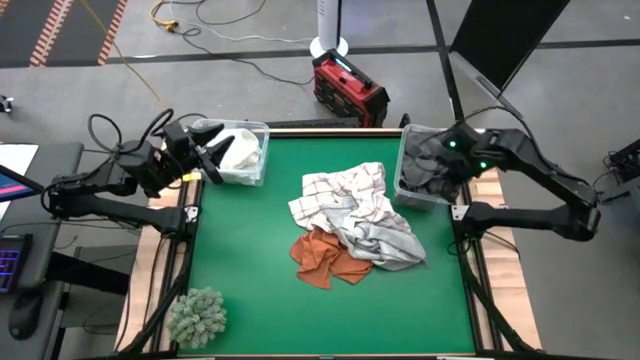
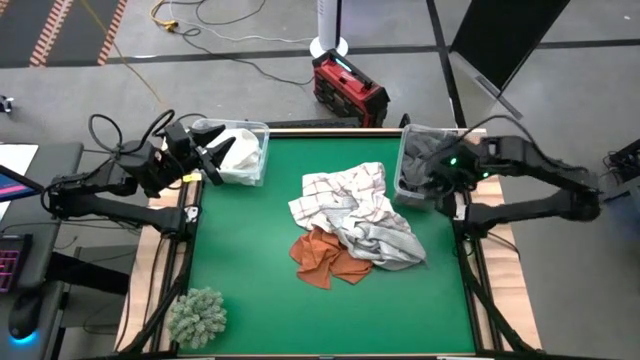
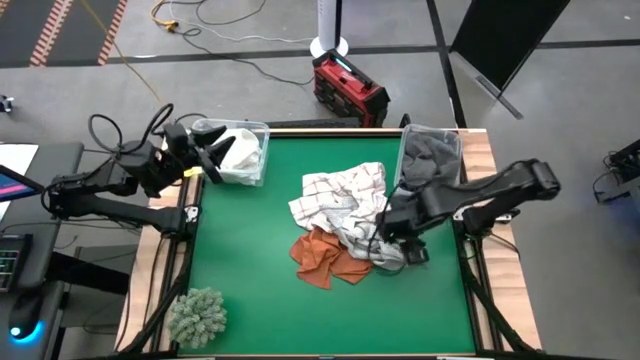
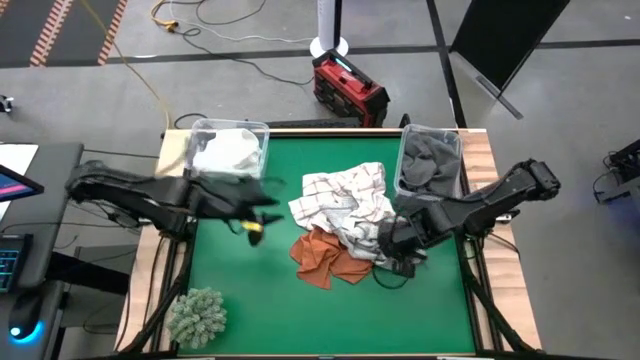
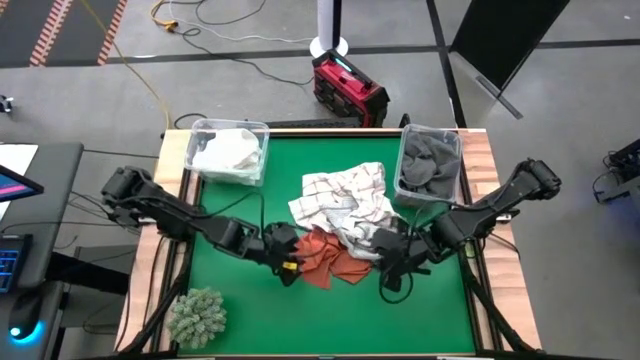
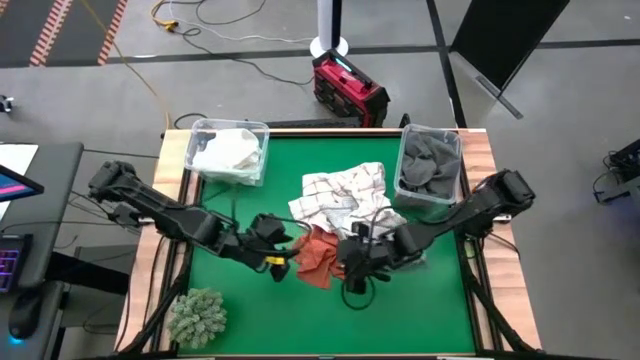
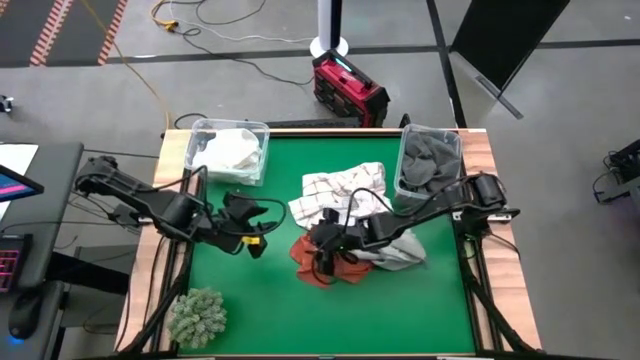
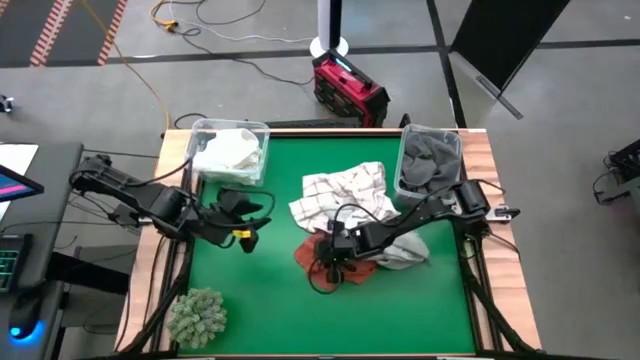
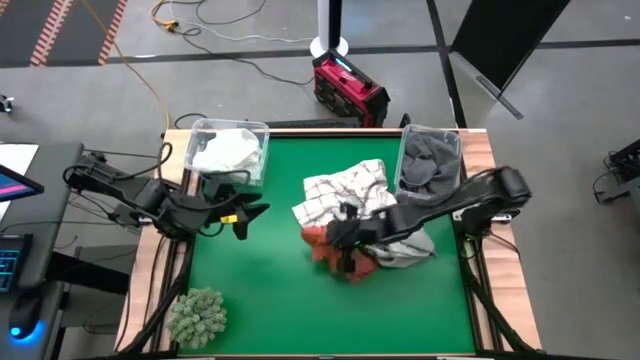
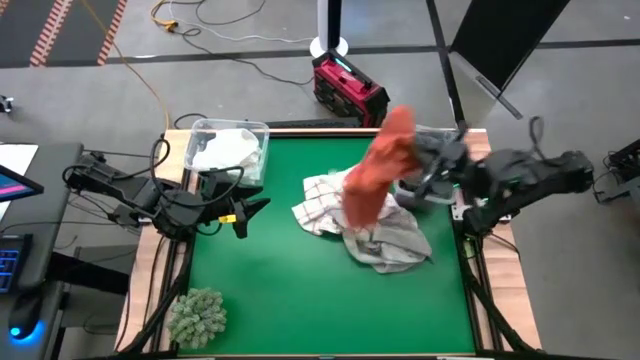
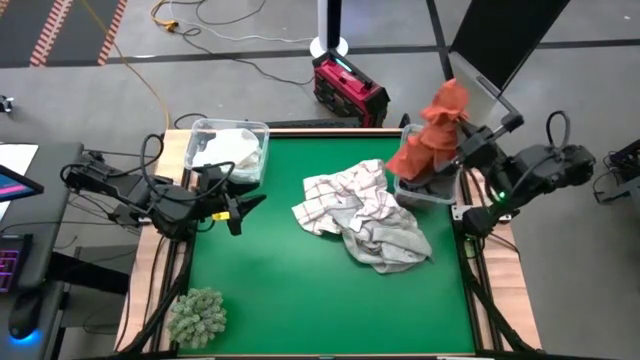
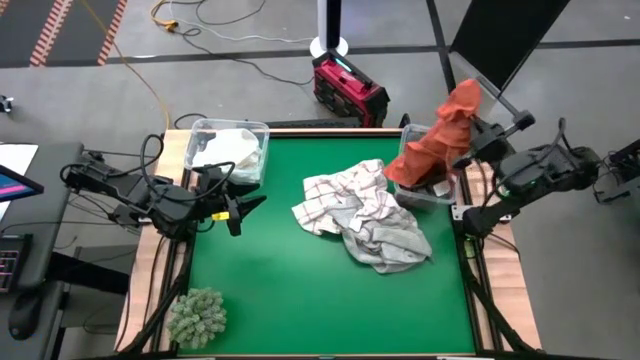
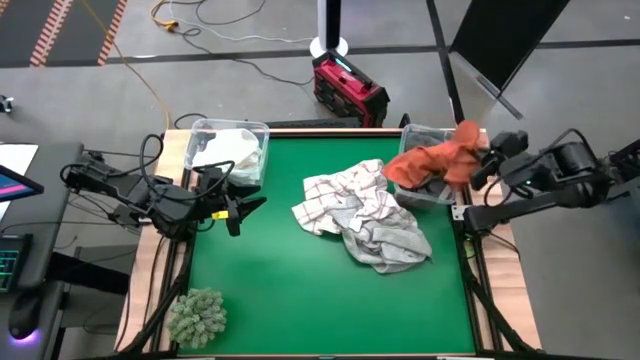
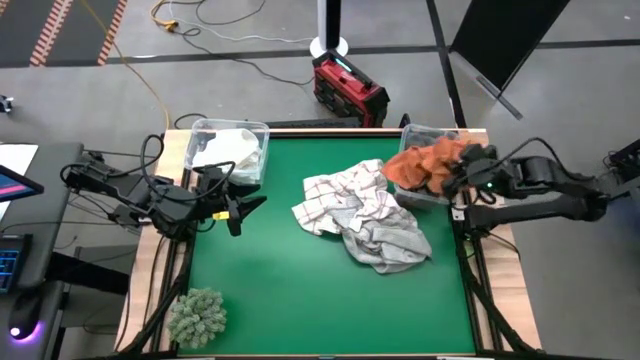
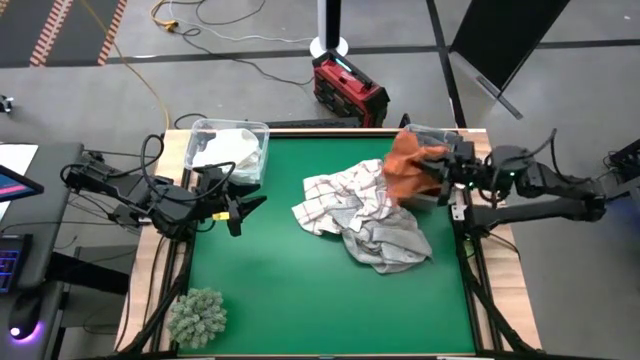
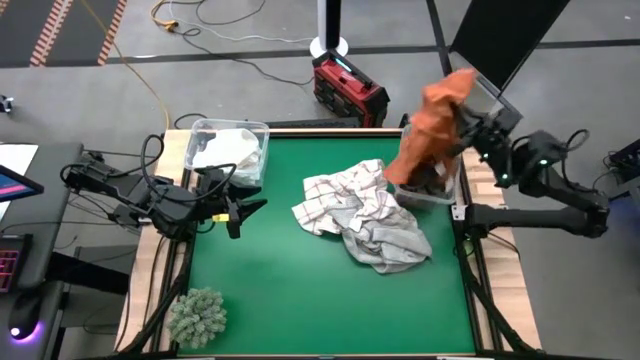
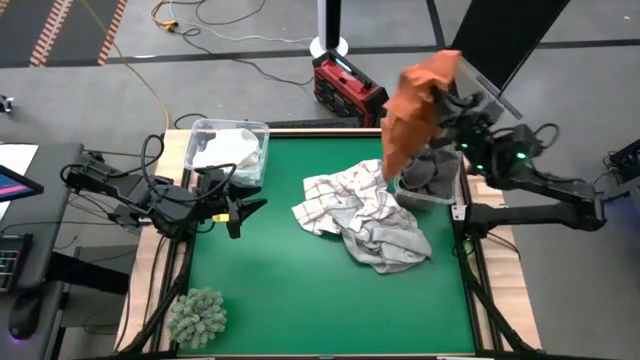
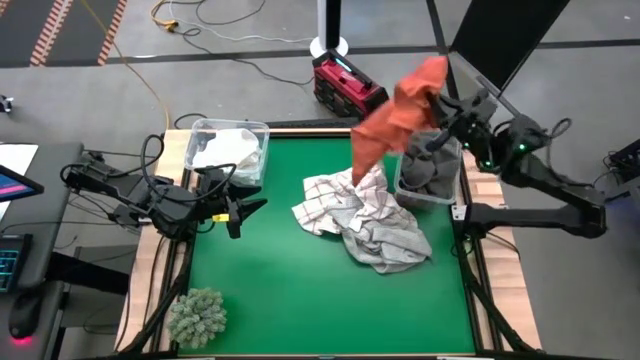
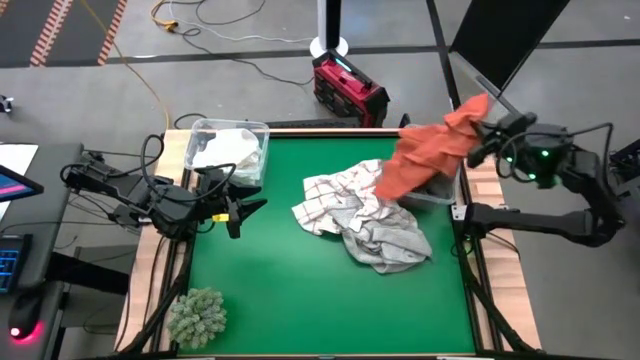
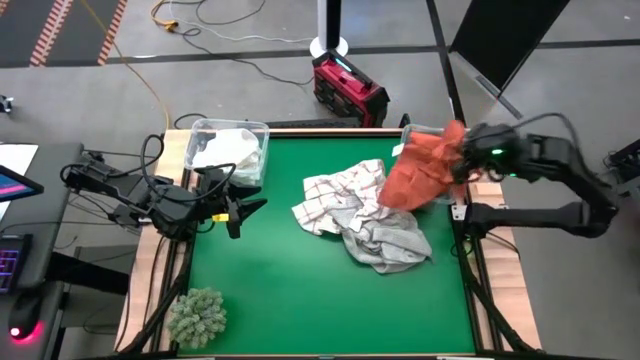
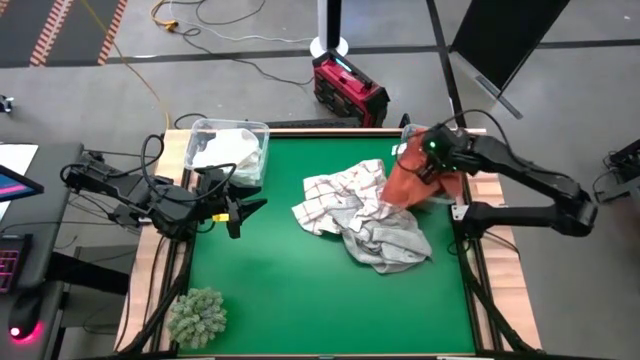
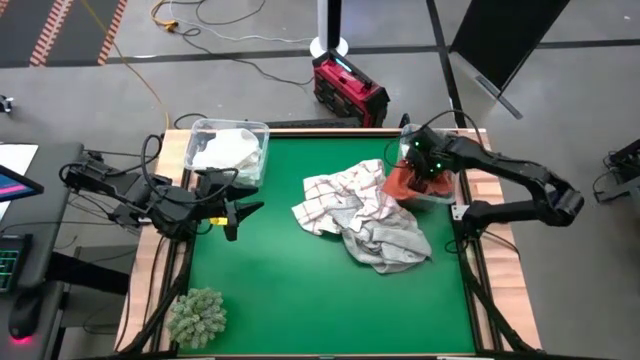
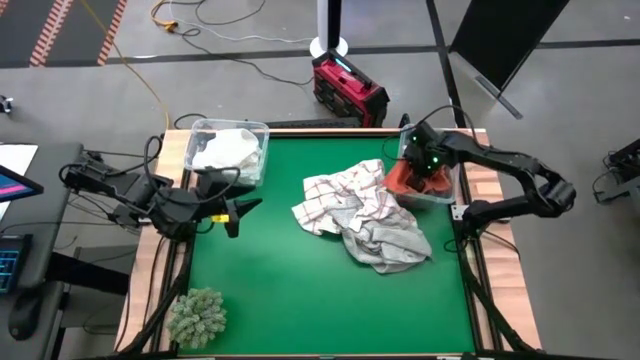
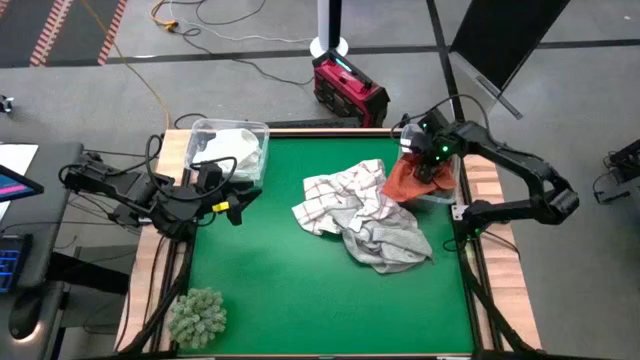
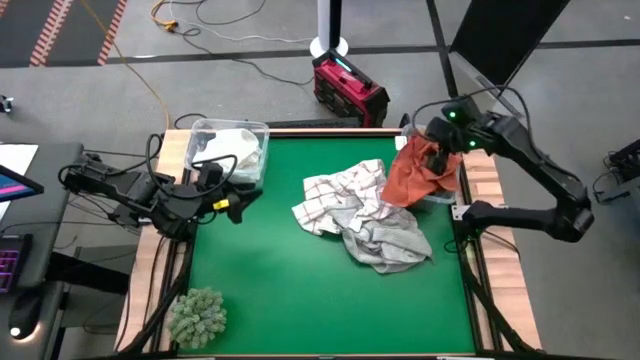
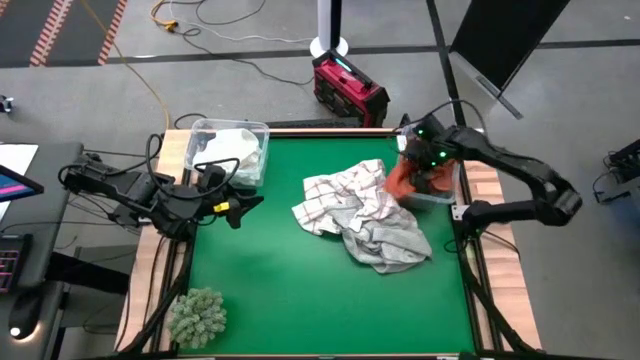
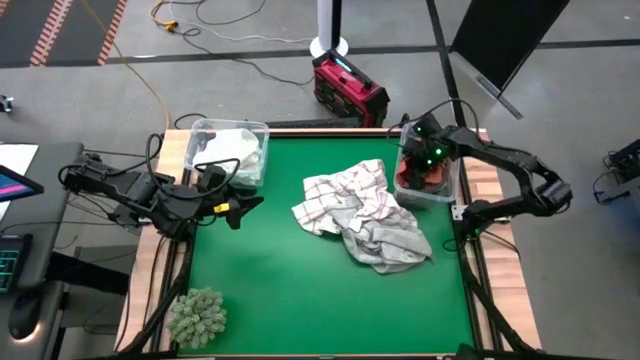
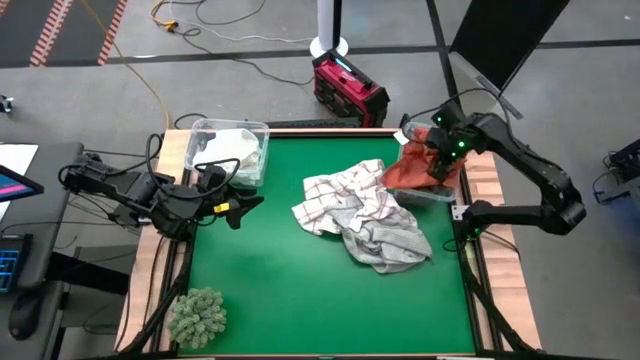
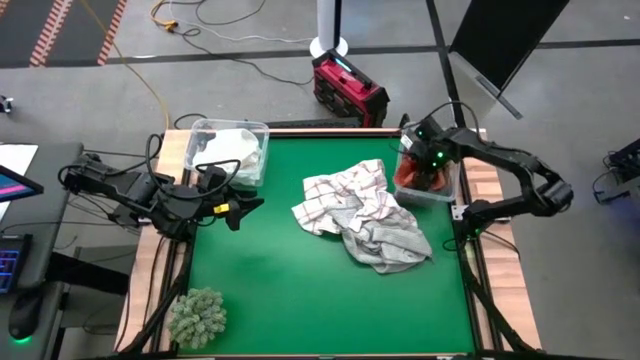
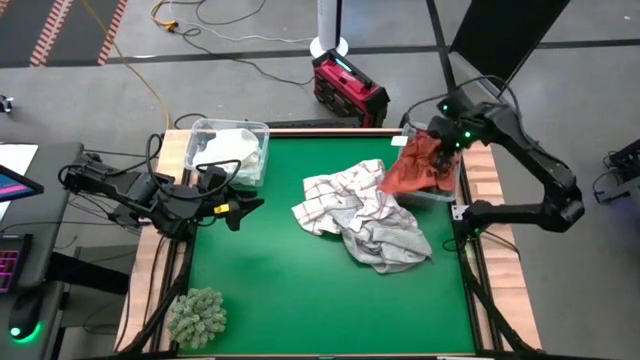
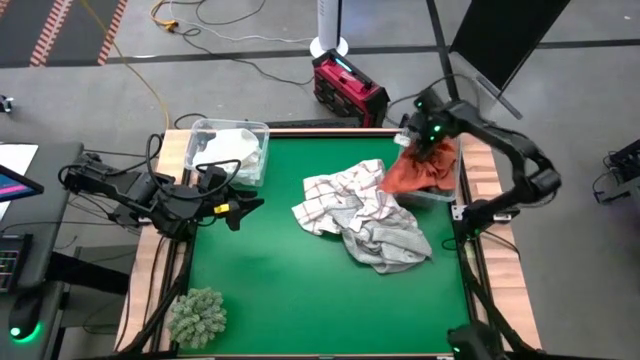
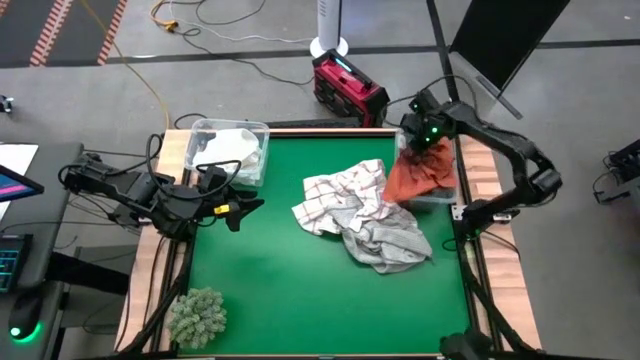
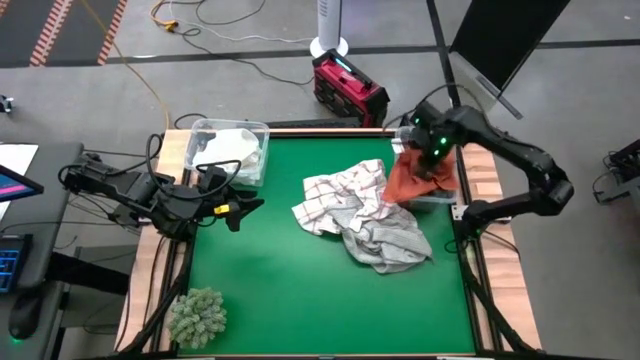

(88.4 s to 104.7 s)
Task: Sort towels by color in basket
Put the orange towel into the right transparent bin
